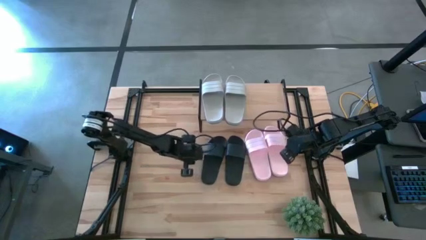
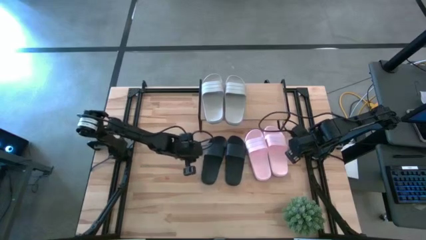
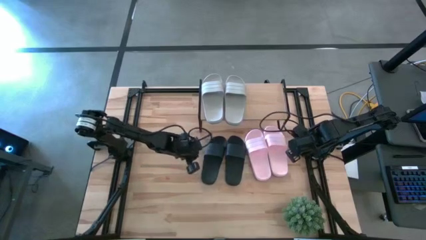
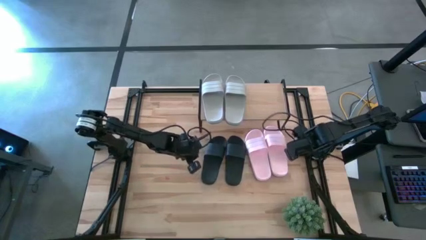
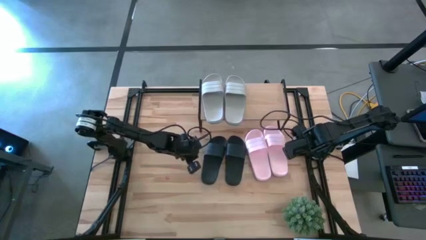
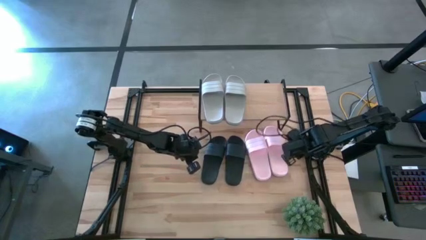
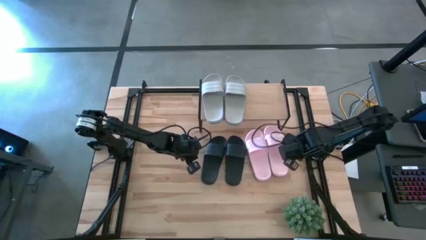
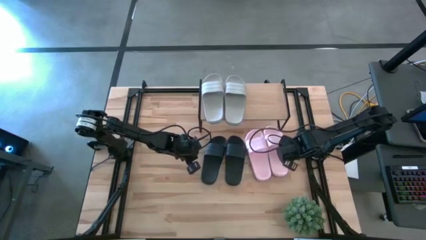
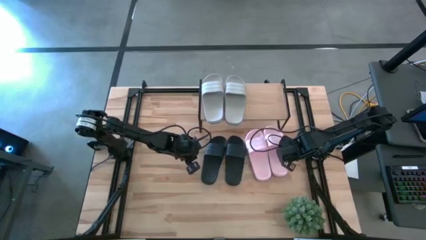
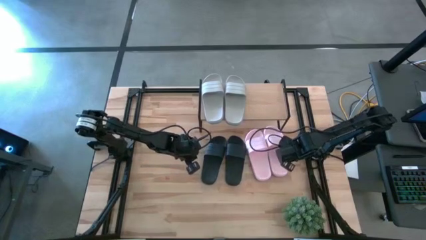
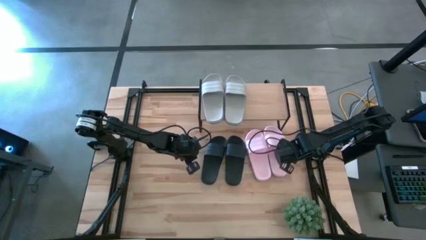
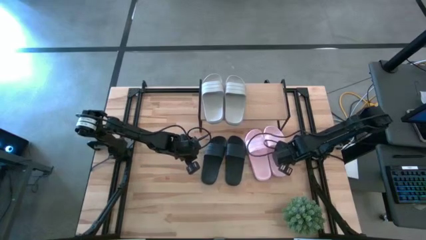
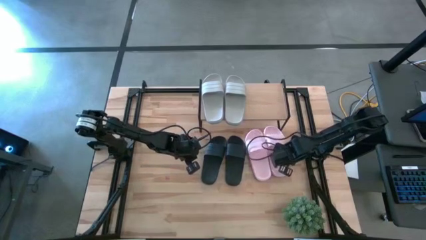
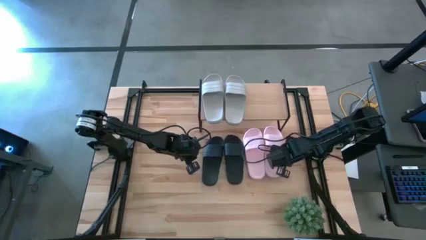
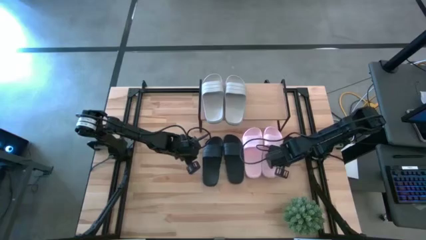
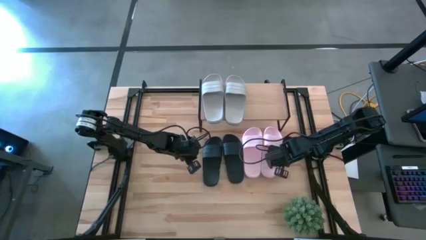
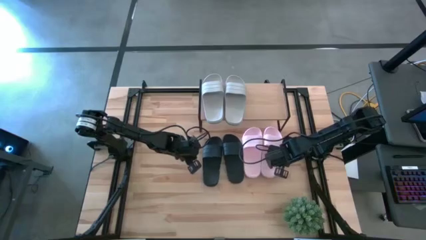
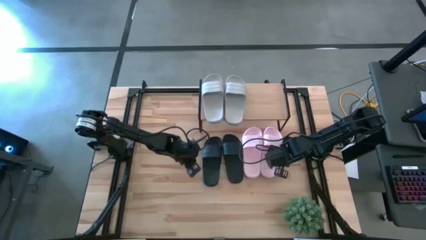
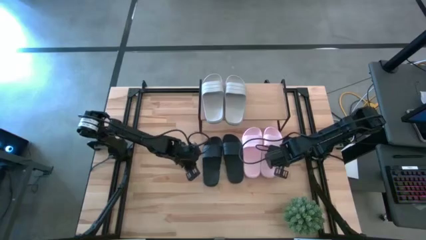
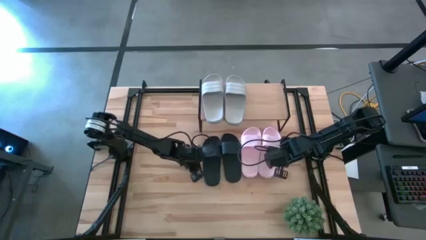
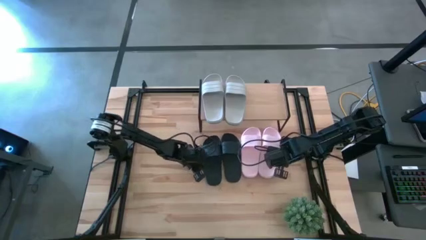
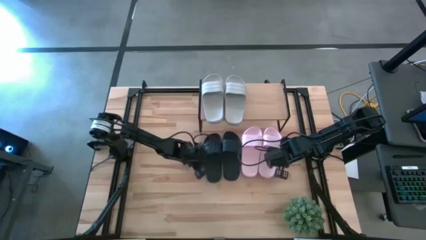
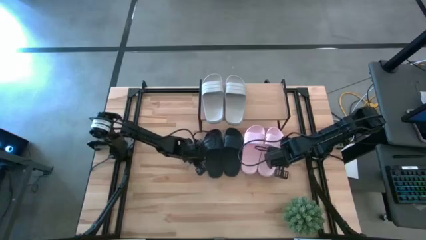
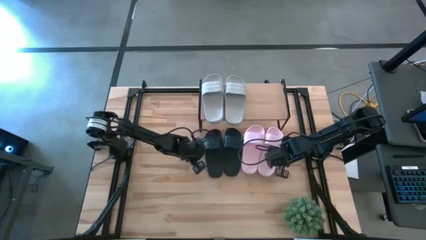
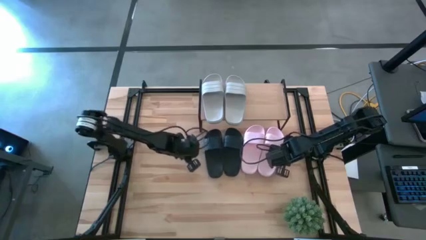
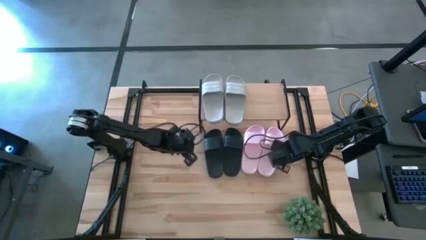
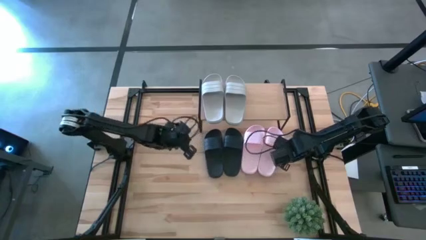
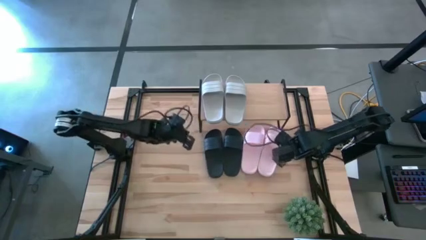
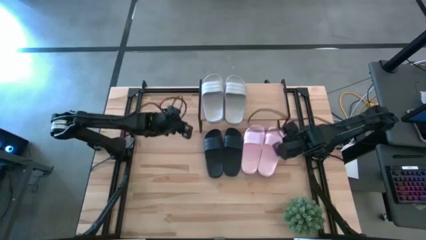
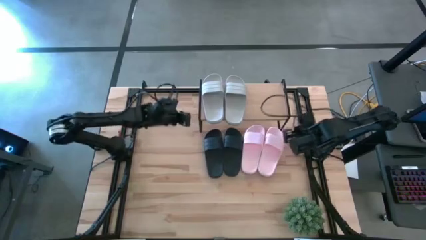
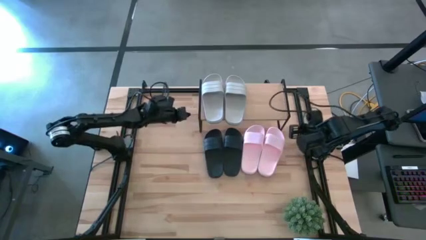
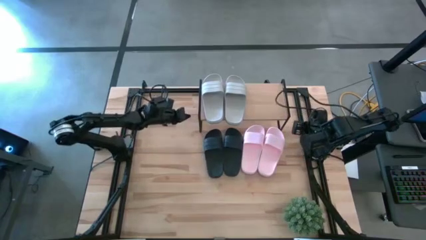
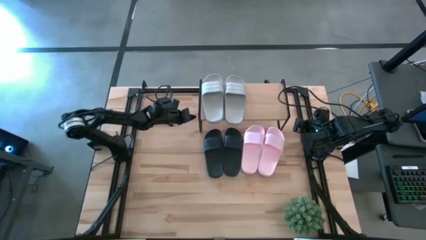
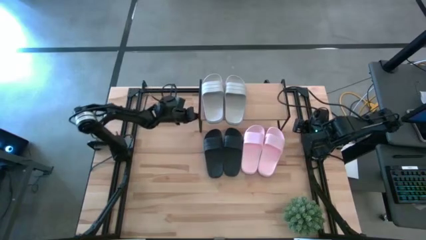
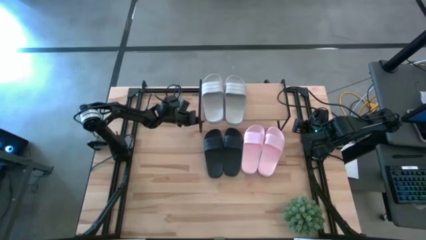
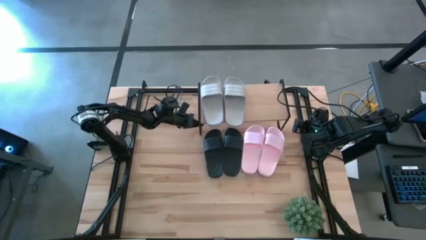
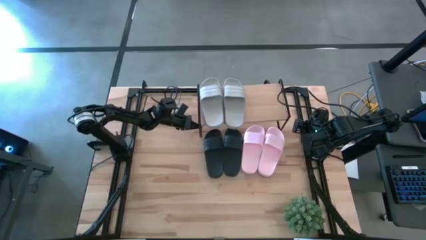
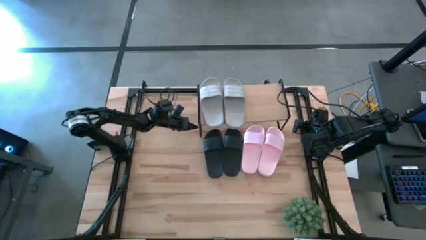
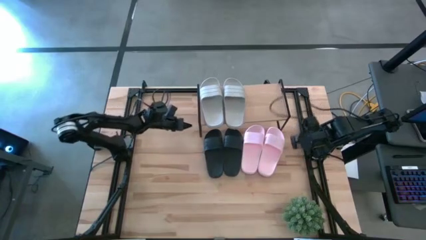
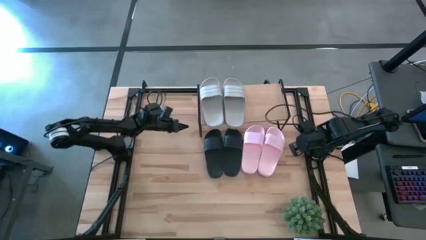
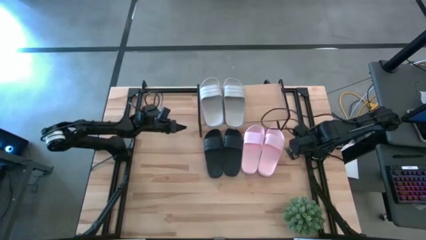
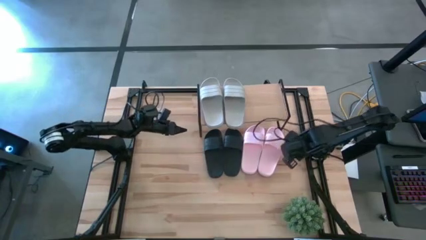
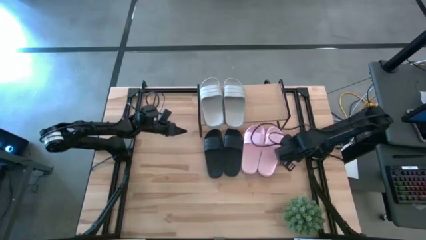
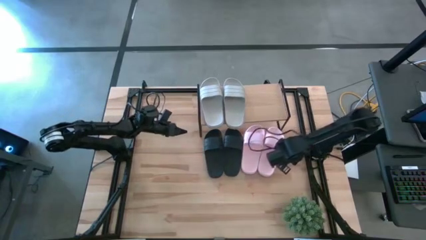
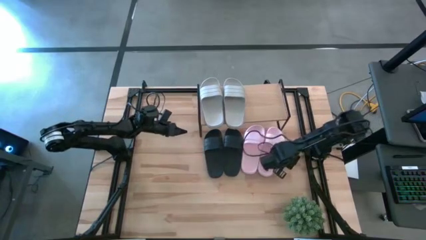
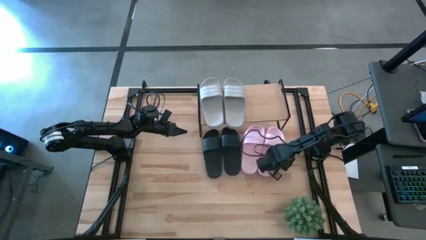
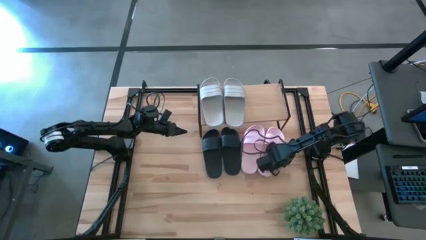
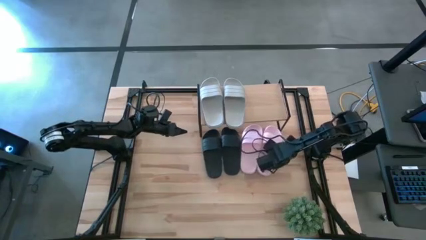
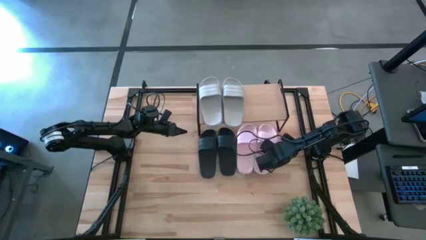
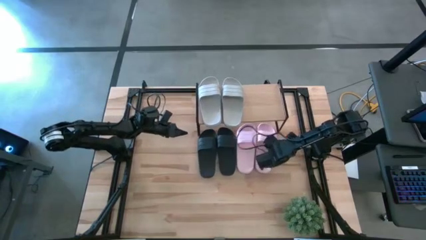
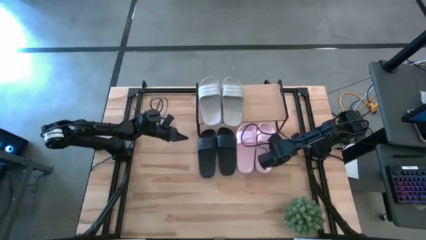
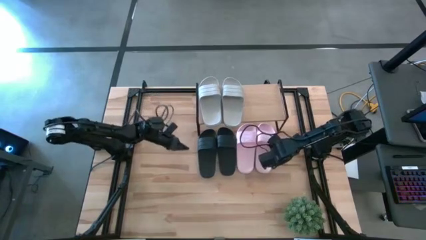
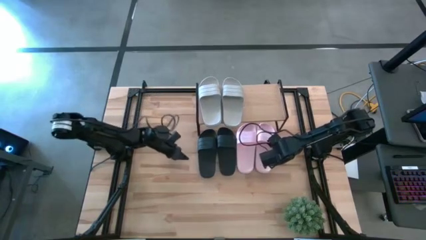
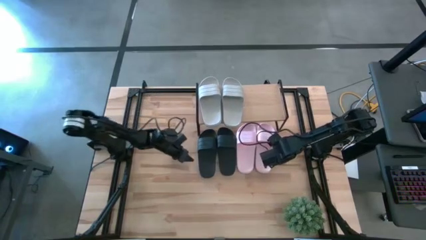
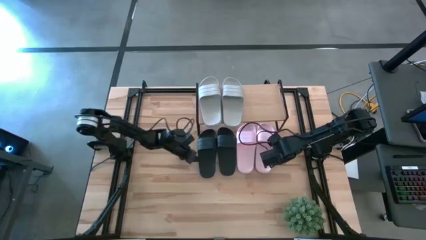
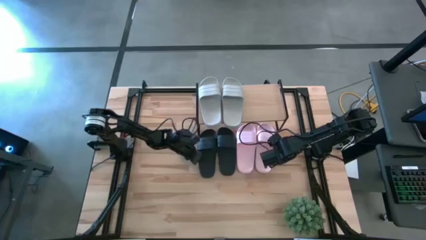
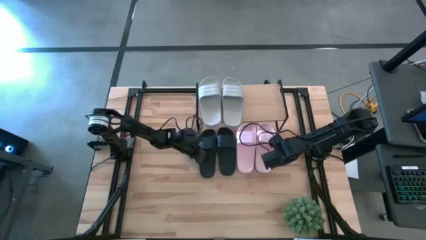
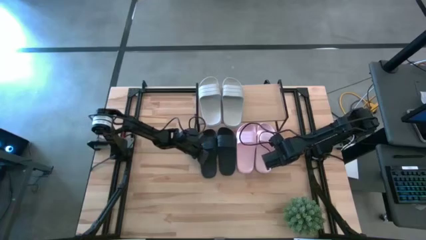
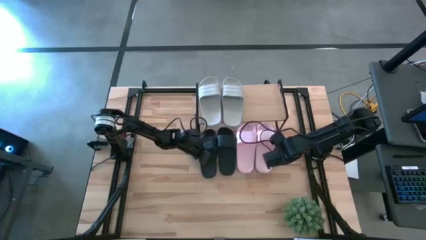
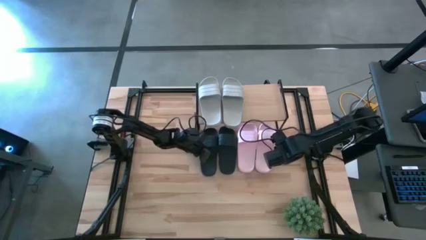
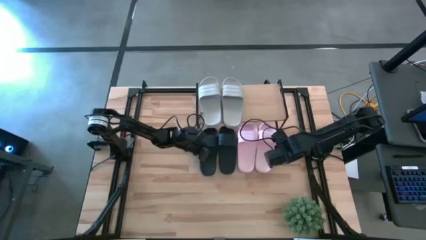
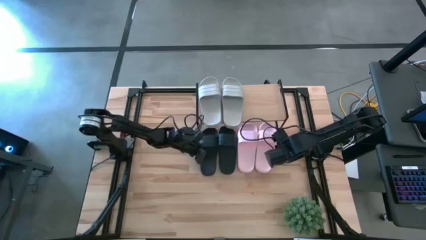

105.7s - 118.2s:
Task: Pick and place slides into the shelf
Adjust the slides on the table
